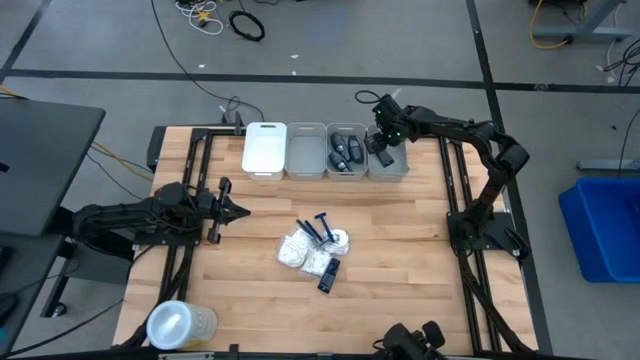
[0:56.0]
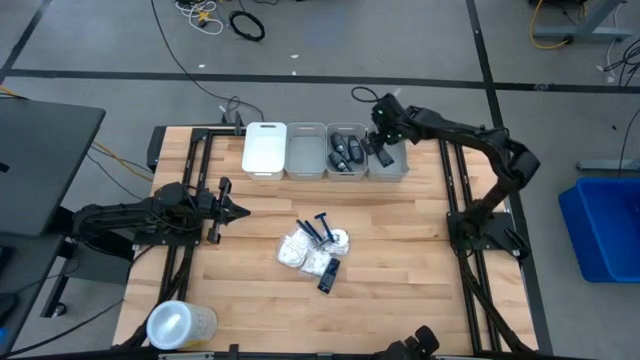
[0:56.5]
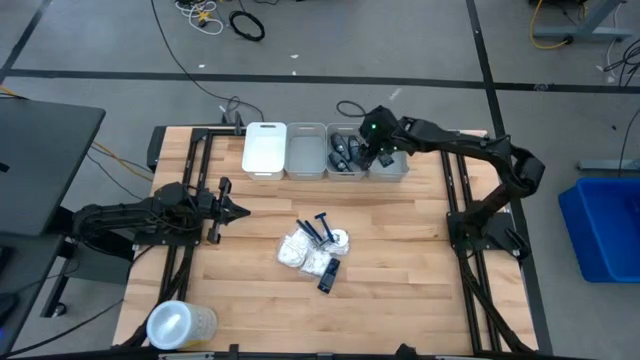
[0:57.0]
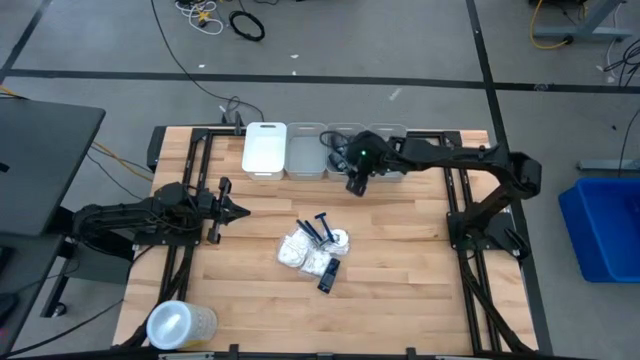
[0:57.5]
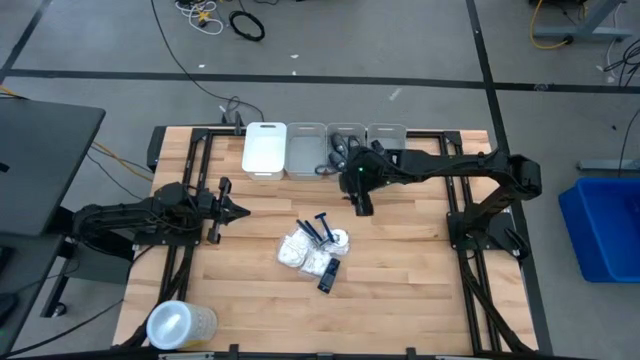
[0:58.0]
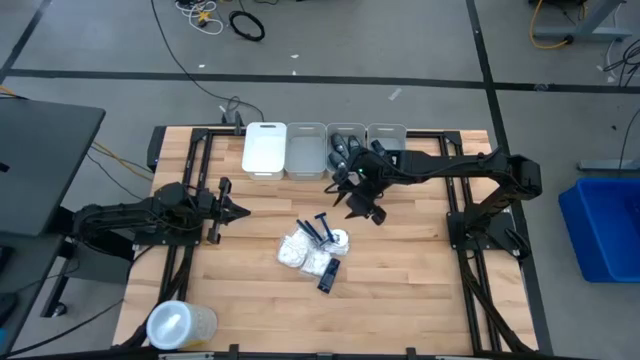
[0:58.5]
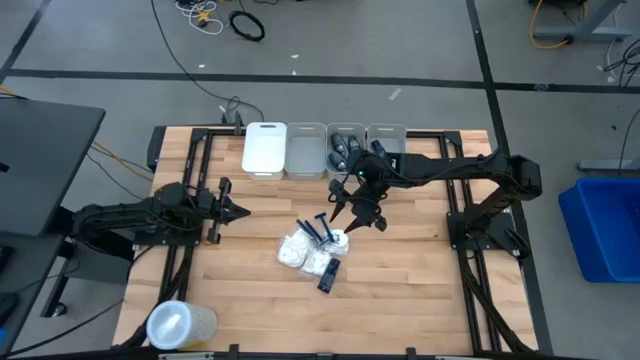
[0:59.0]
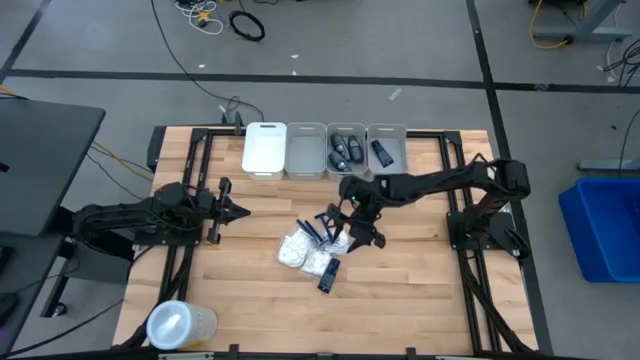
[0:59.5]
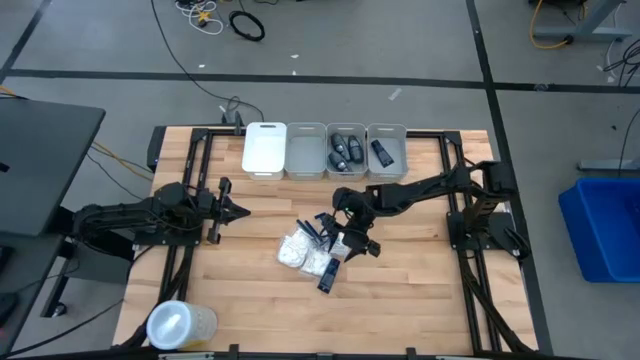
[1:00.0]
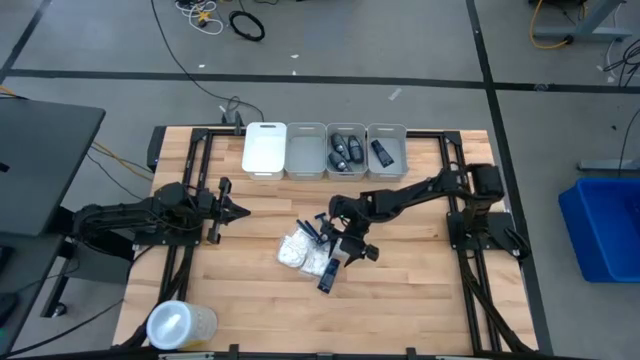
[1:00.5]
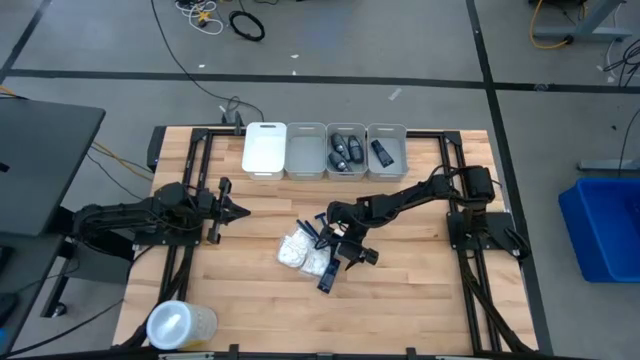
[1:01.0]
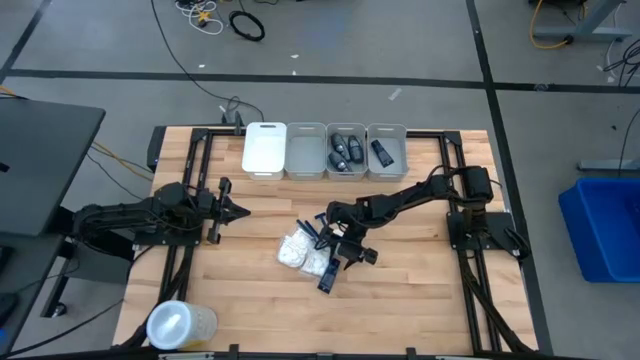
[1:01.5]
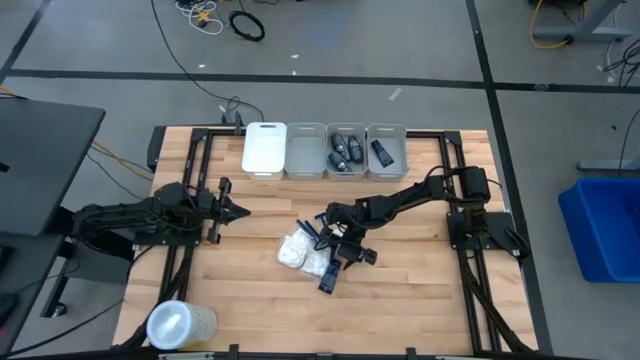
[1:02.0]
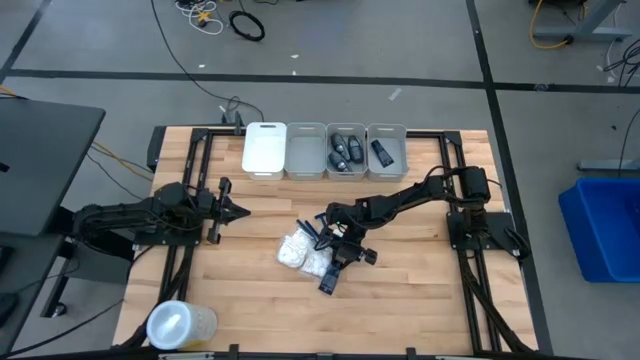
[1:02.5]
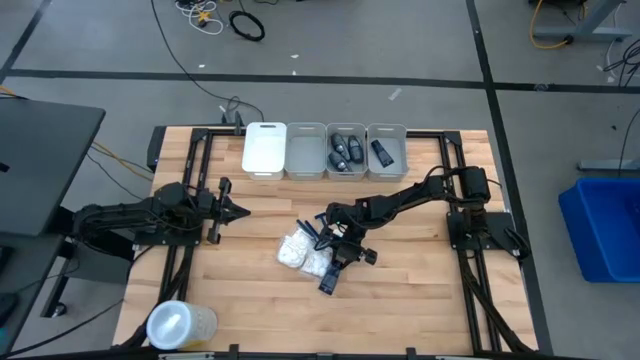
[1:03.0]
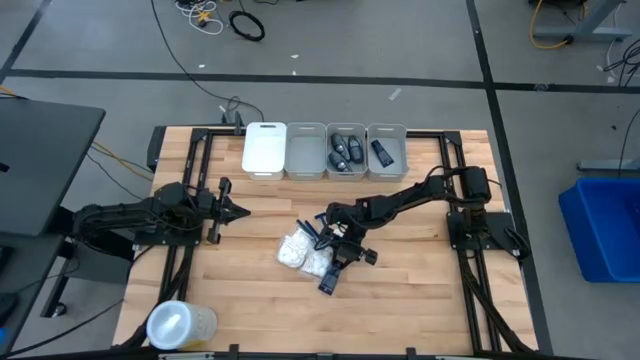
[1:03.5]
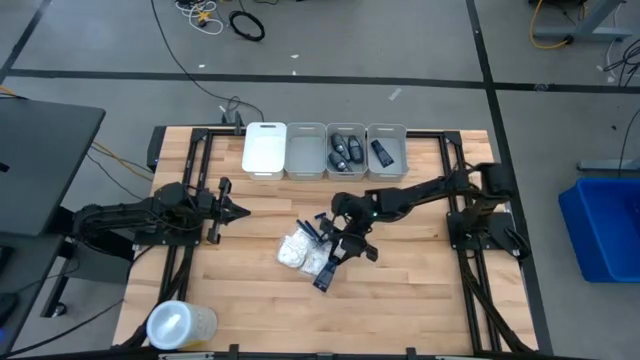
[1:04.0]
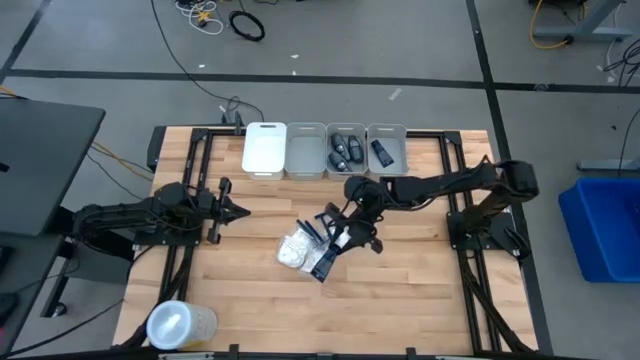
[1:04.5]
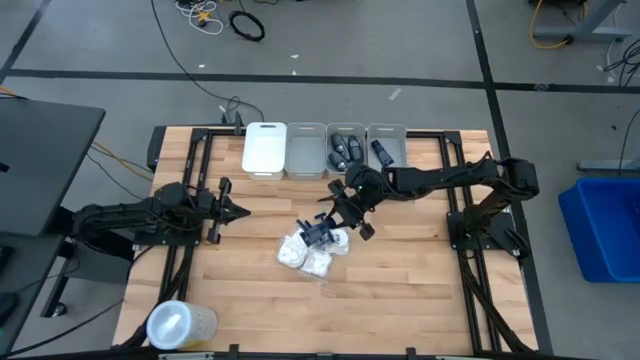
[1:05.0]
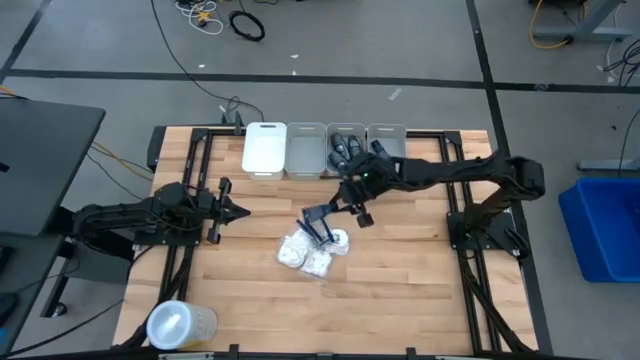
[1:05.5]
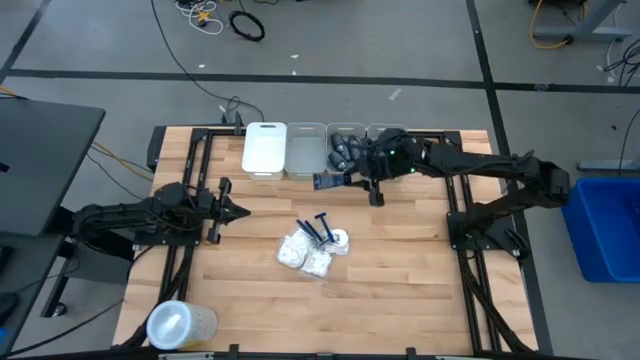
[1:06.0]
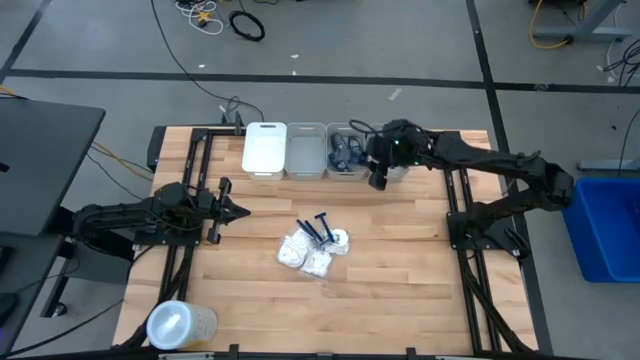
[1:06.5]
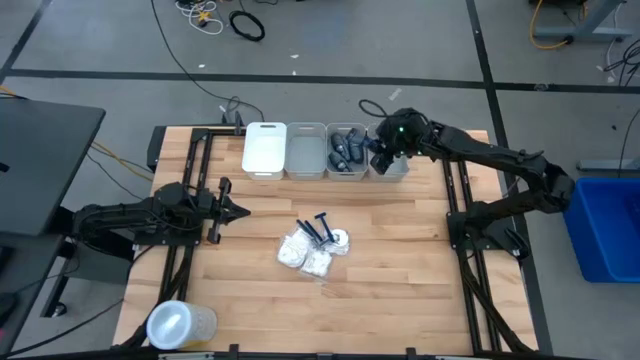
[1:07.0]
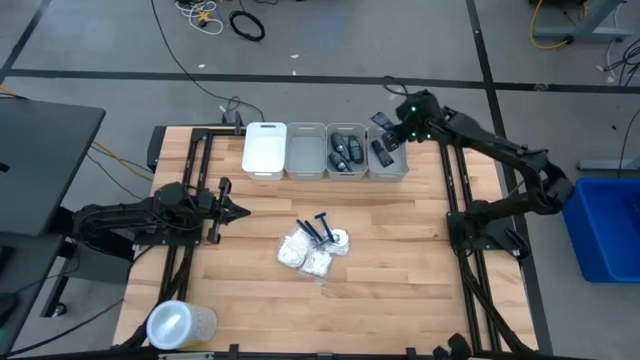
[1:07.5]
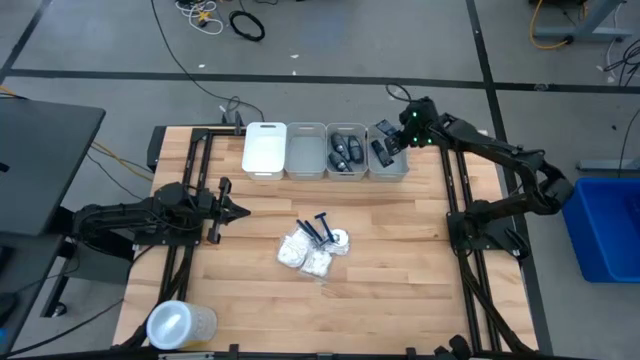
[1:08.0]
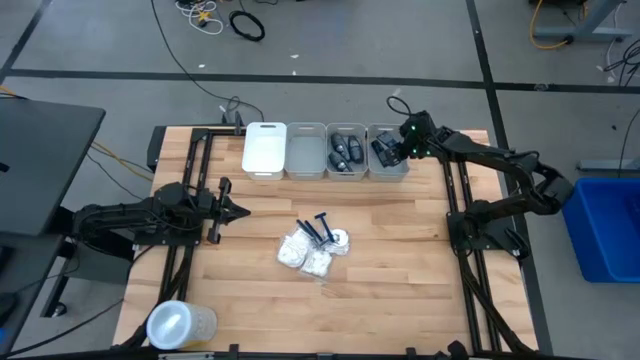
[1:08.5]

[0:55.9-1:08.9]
Task: Pick & Place Travel size toiletries
Put the blue shave cream into the right gray bin

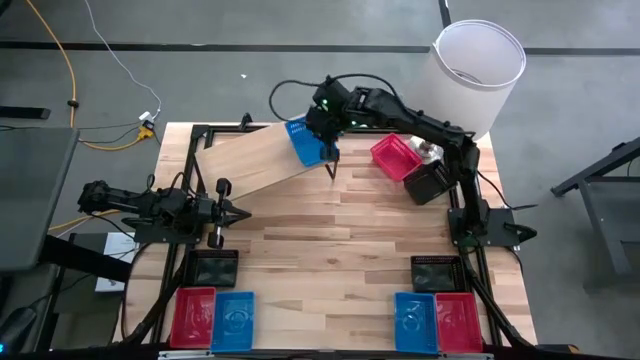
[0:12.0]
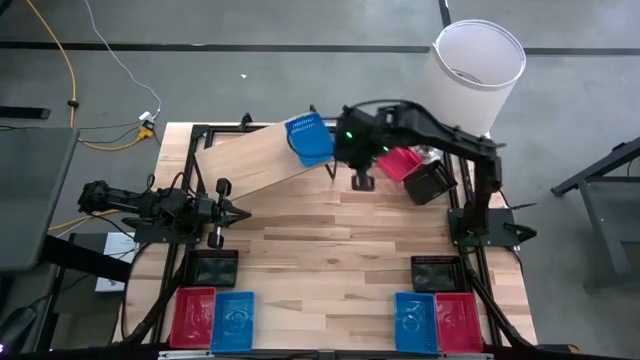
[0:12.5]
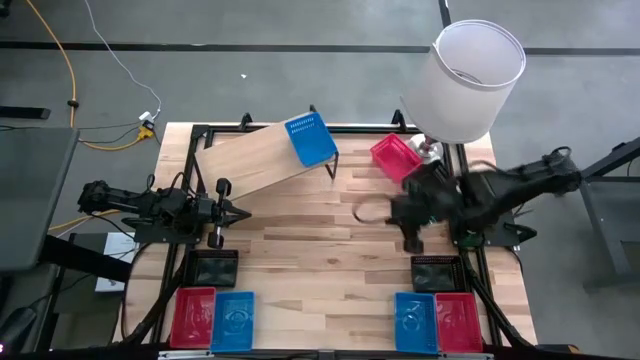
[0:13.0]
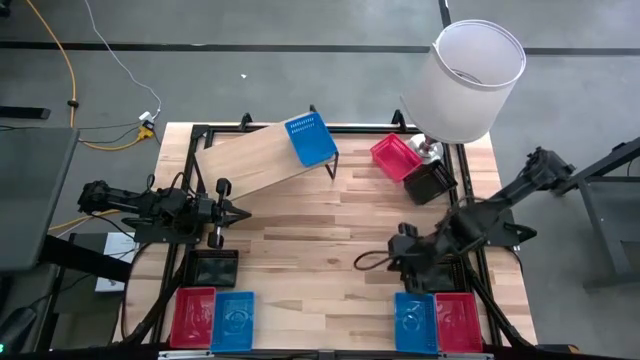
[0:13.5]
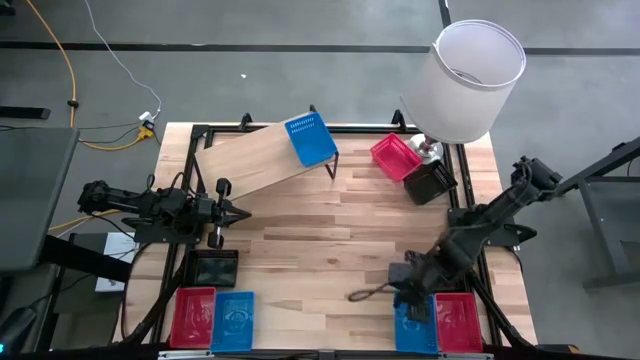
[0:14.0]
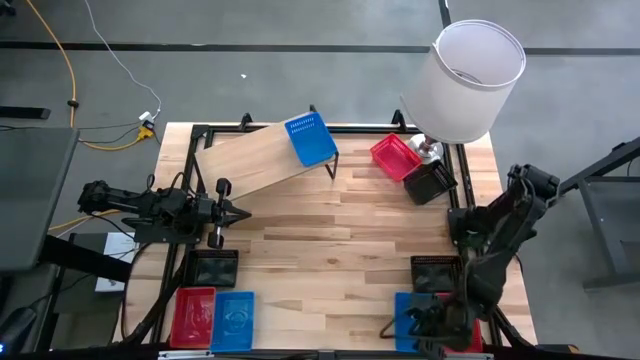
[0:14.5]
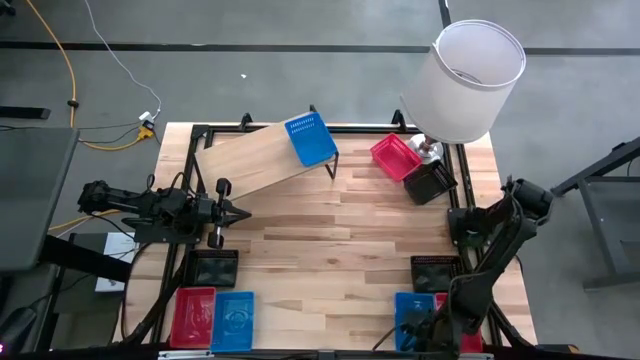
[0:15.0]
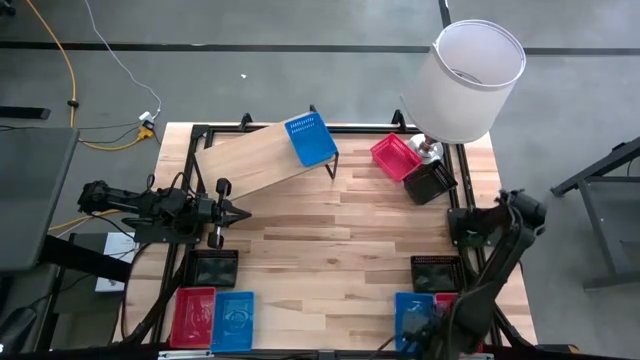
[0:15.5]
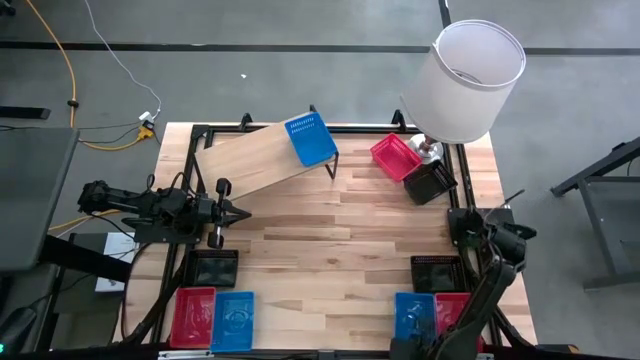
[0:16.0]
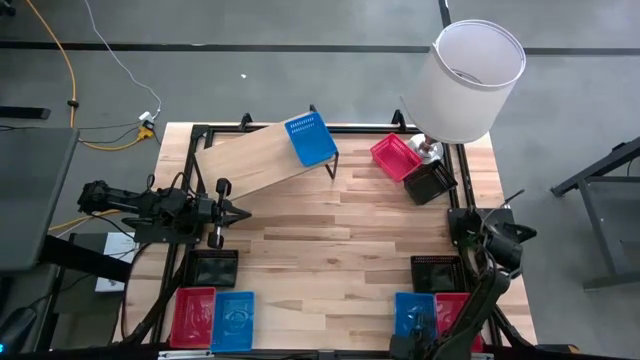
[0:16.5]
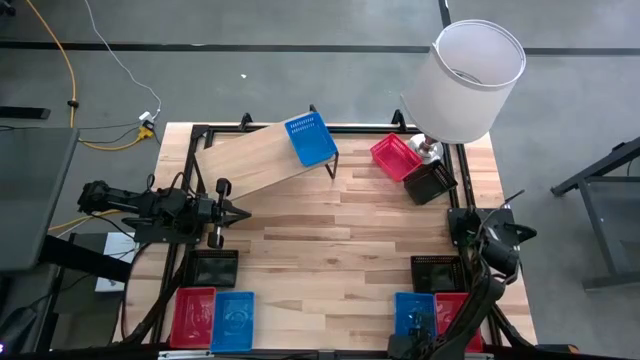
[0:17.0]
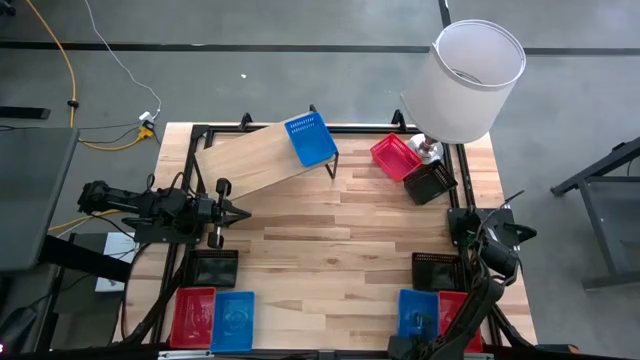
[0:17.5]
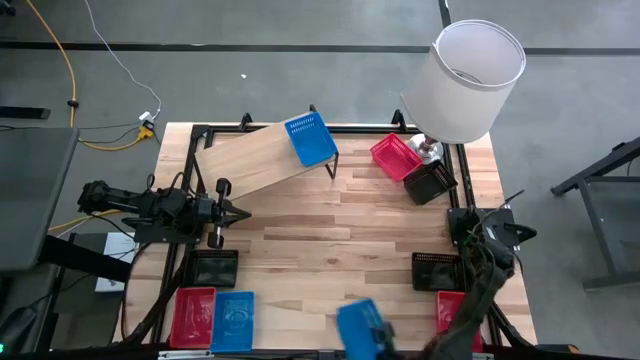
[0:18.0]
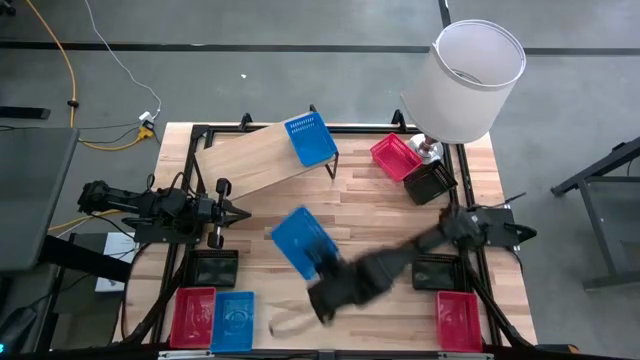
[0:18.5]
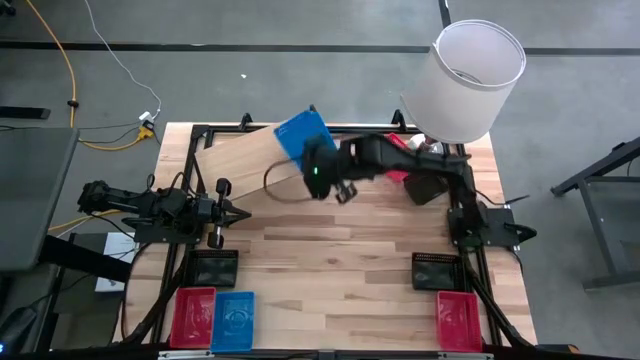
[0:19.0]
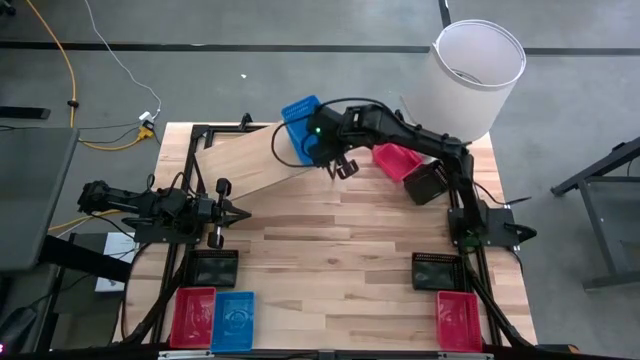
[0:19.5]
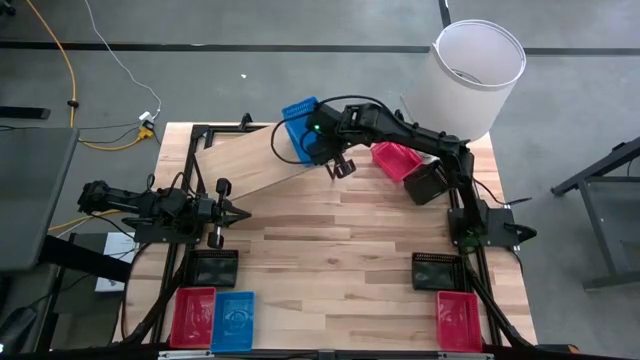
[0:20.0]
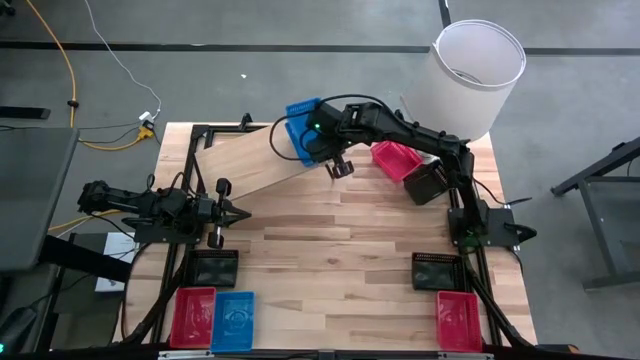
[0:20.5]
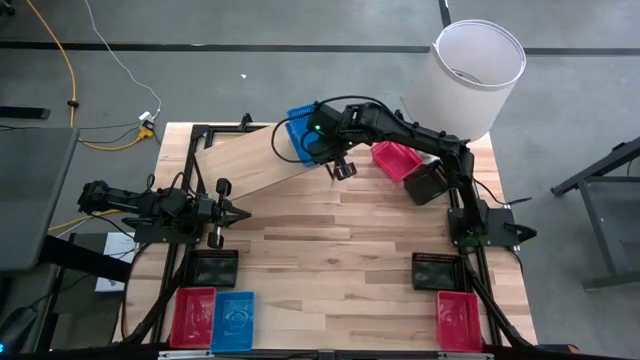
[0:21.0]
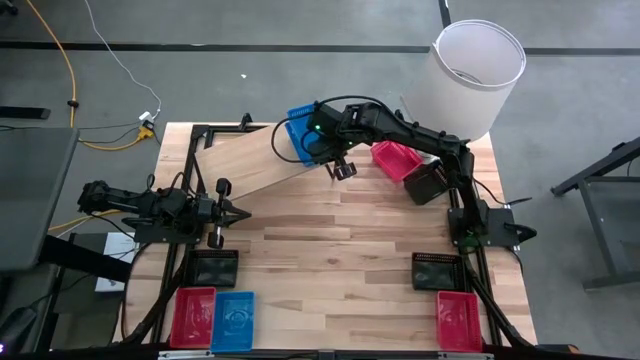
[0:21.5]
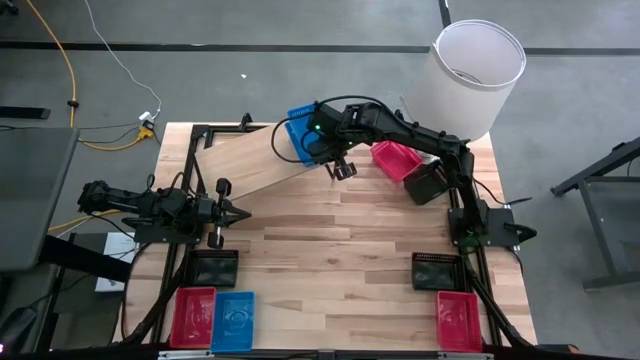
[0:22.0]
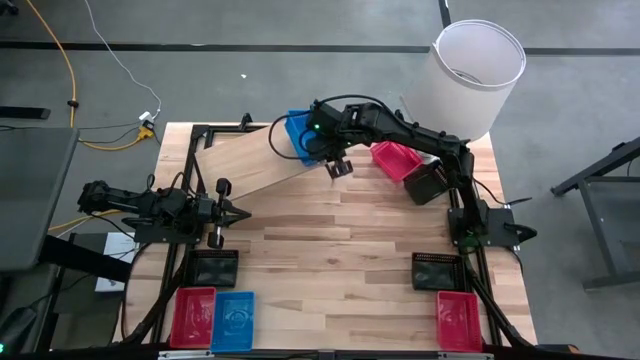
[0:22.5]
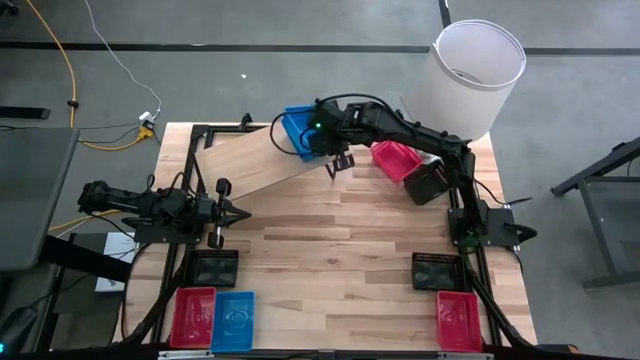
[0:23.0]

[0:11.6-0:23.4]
Task: Stack baskets on shelf by color
Stack the right blue bin on top of the other blue bin on the shelf
